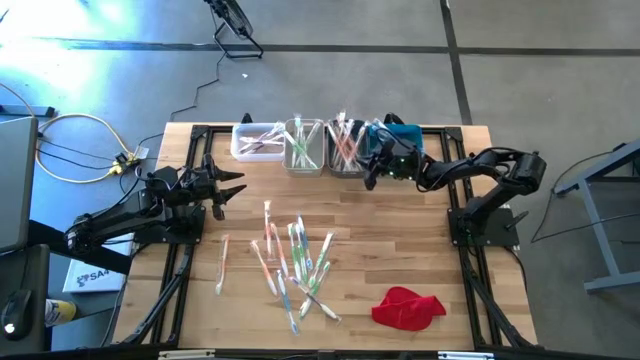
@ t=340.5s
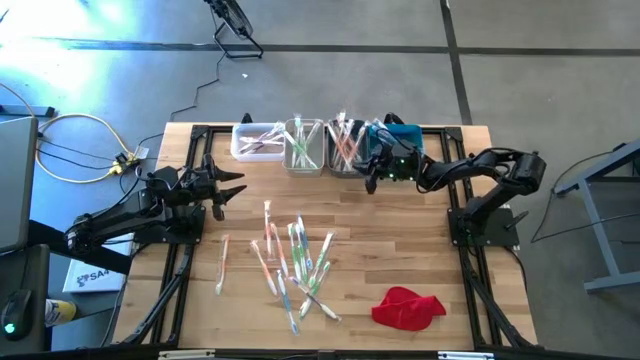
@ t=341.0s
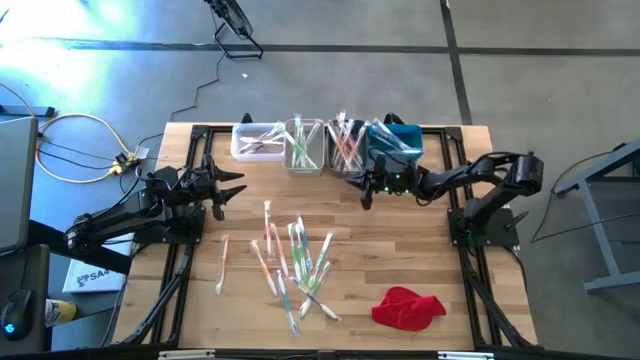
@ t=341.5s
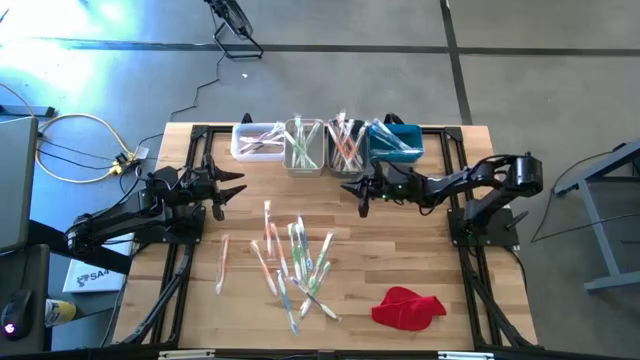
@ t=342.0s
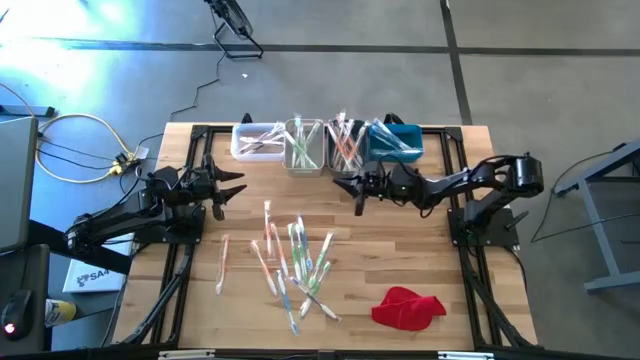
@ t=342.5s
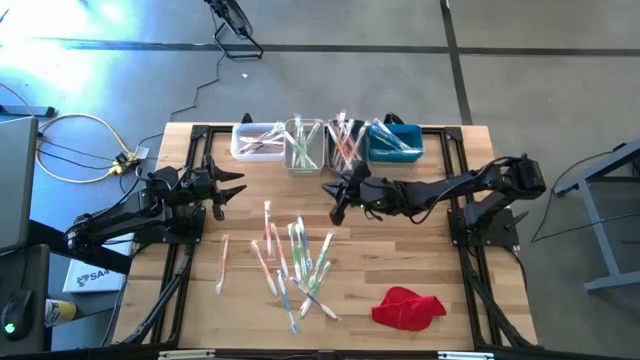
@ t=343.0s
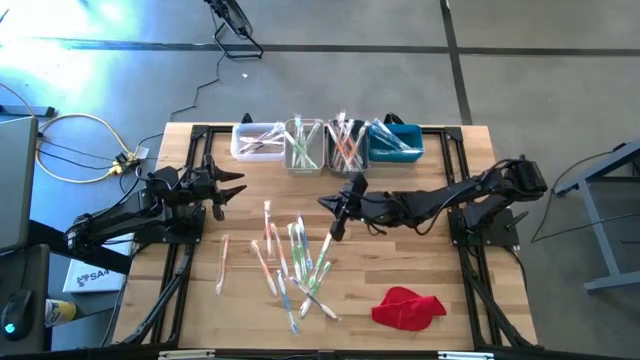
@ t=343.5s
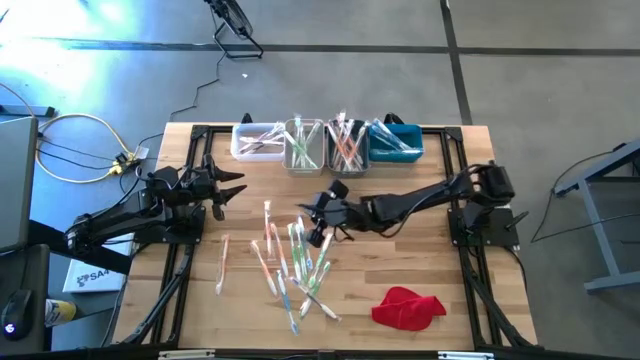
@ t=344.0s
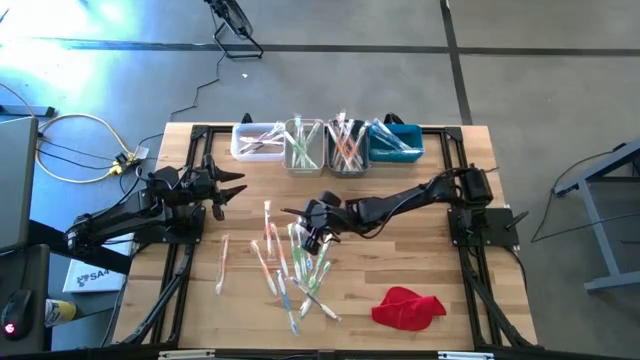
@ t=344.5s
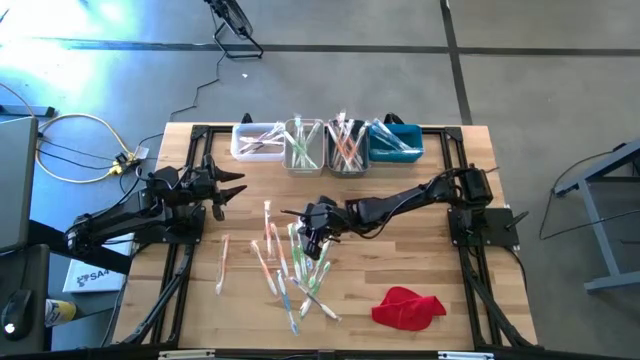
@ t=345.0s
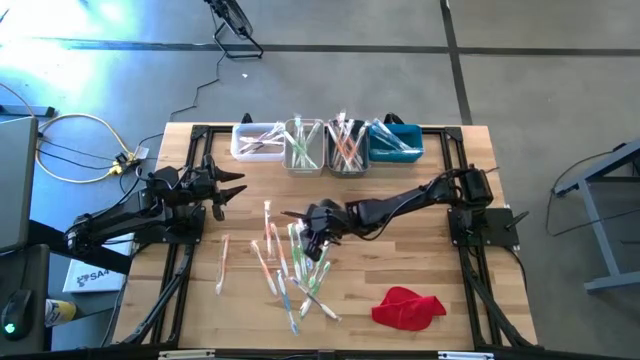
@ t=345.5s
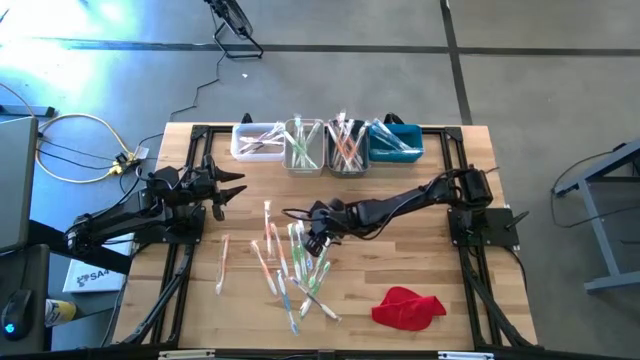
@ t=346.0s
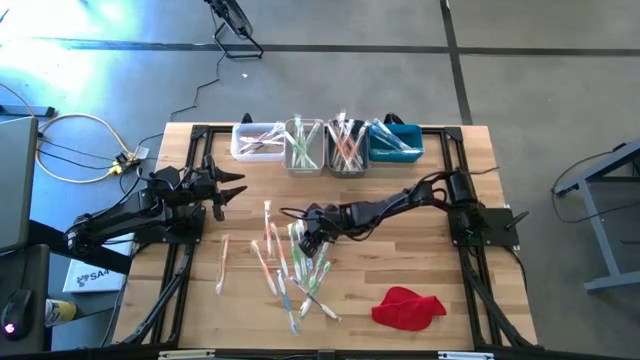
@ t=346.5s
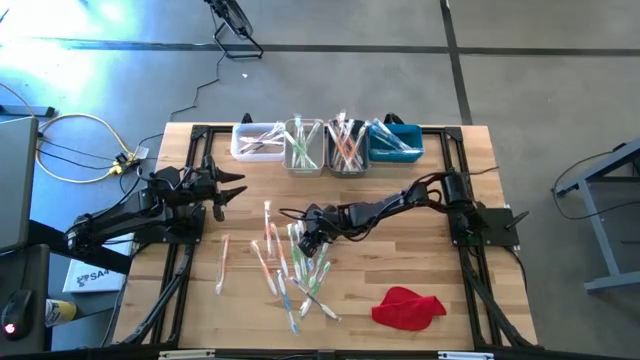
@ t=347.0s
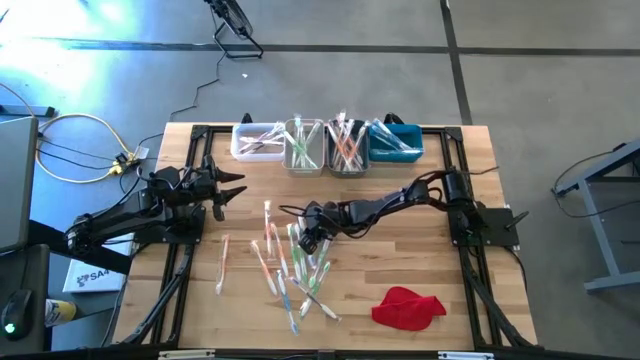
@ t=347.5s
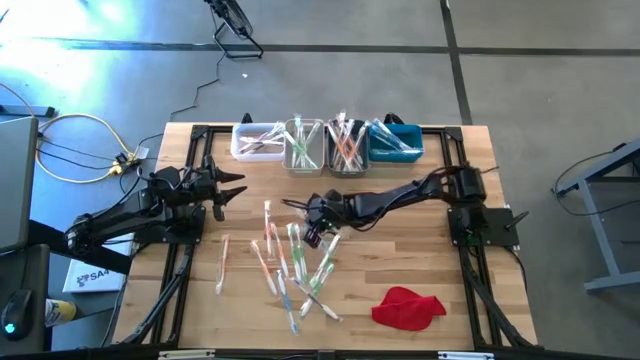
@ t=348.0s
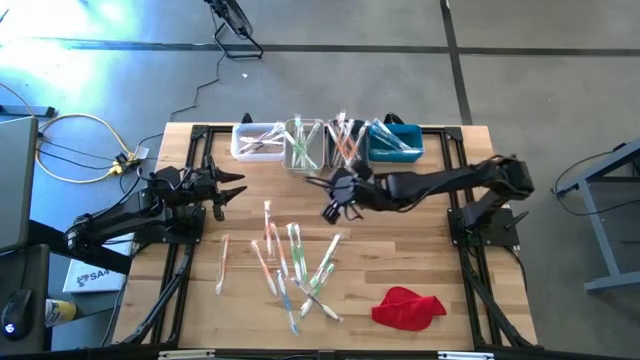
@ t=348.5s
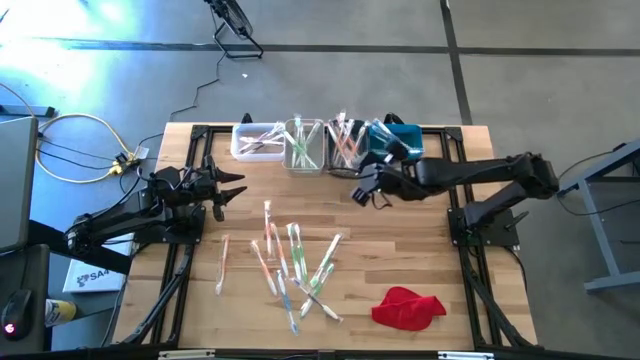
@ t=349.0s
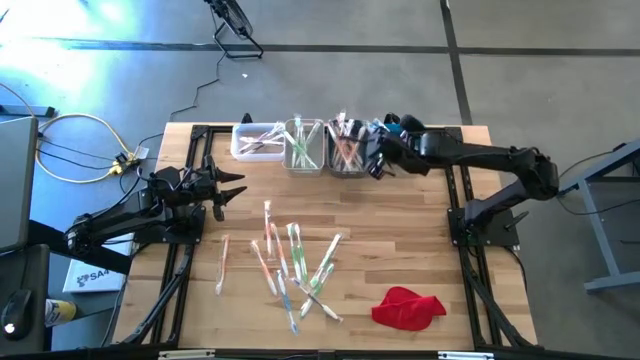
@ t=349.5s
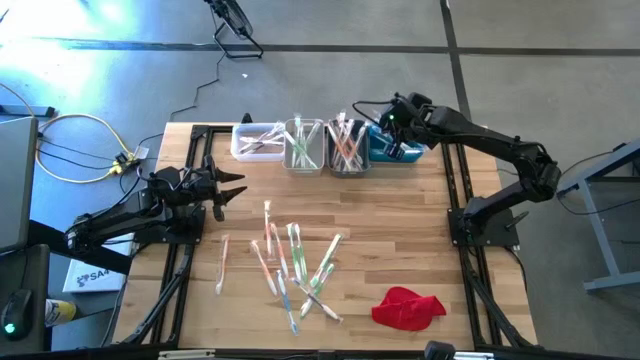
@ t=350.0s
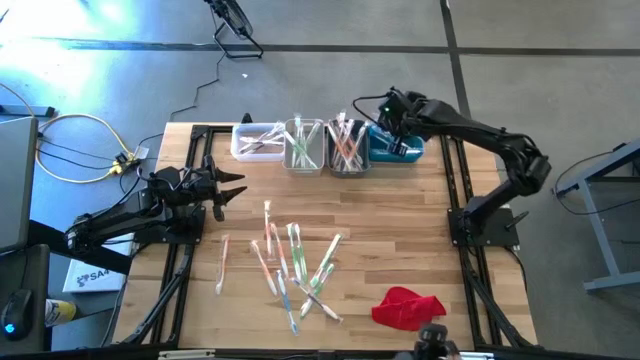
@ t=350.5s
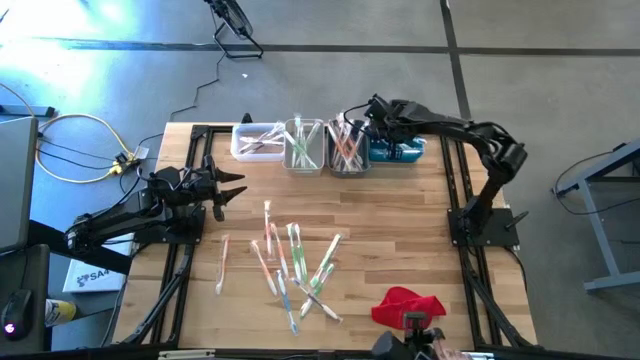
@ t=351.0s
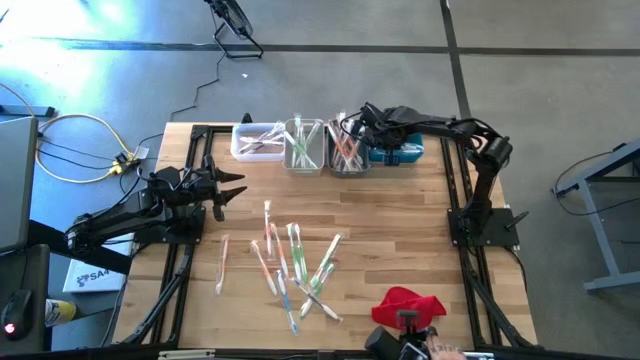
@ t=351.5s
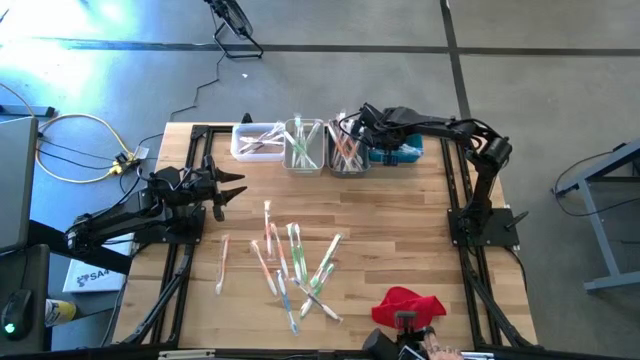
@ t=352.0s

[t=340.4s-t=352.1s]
Task: Pick & Place Toothbrushes
Put the blue toothbrush into the blue bin

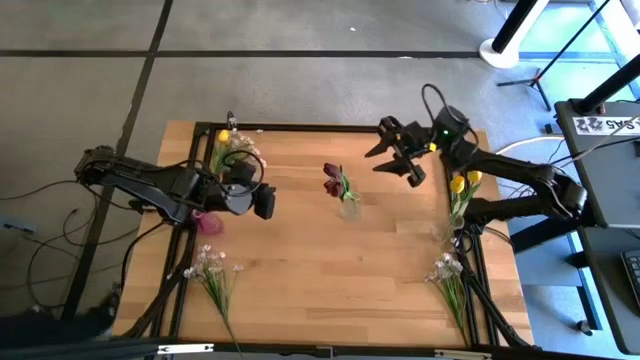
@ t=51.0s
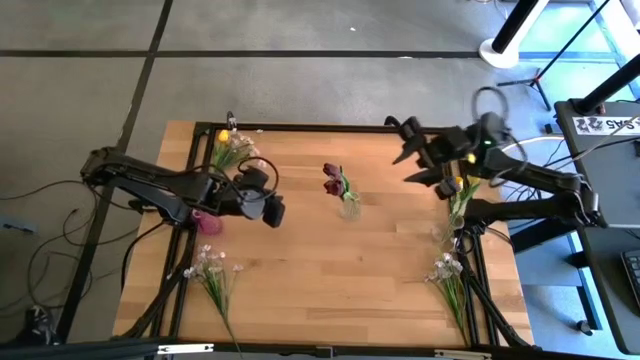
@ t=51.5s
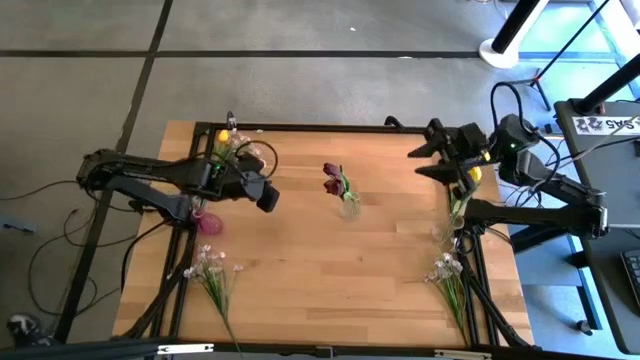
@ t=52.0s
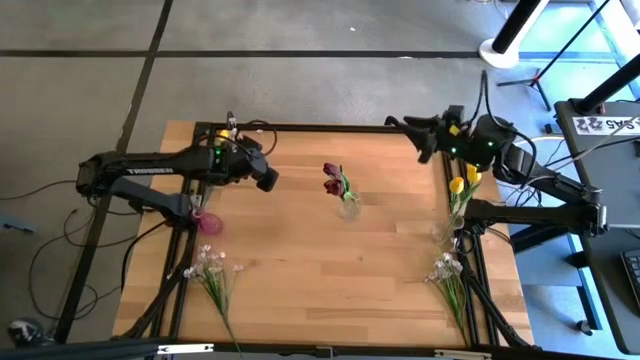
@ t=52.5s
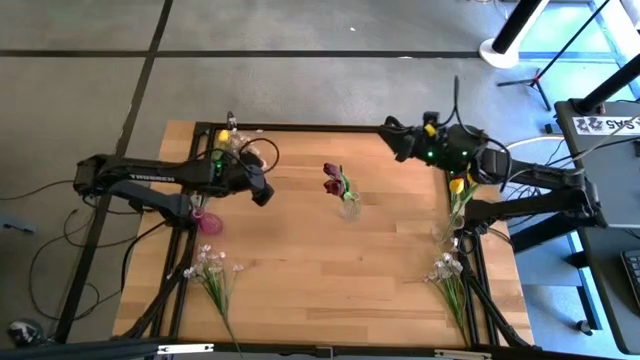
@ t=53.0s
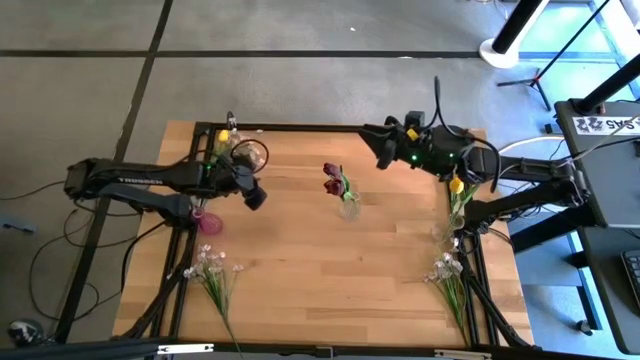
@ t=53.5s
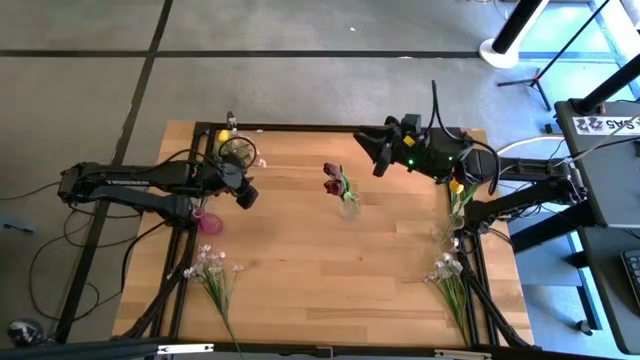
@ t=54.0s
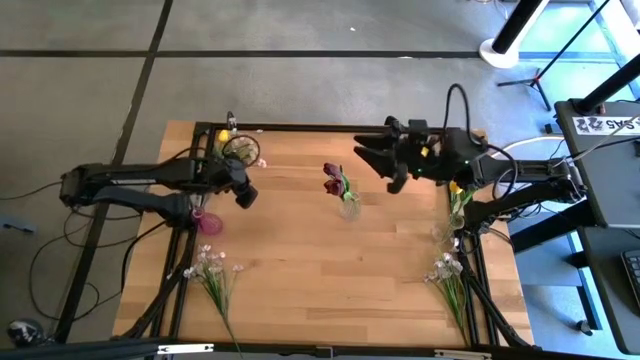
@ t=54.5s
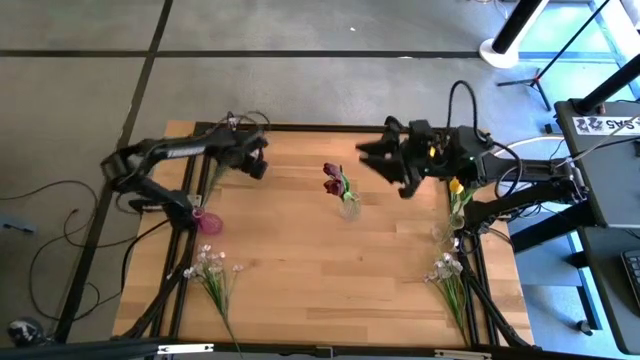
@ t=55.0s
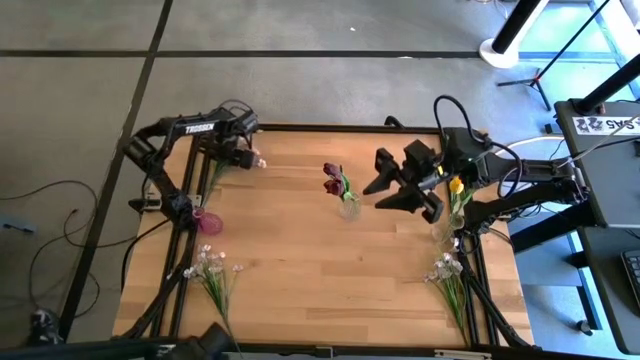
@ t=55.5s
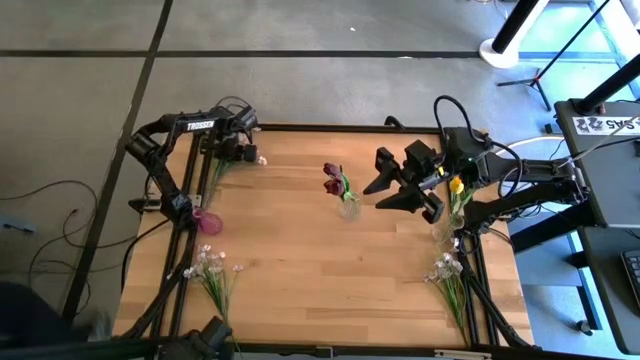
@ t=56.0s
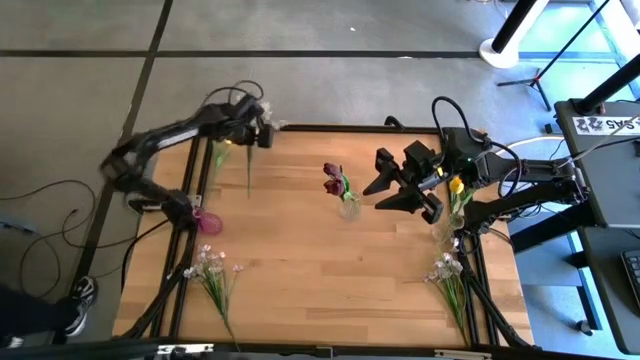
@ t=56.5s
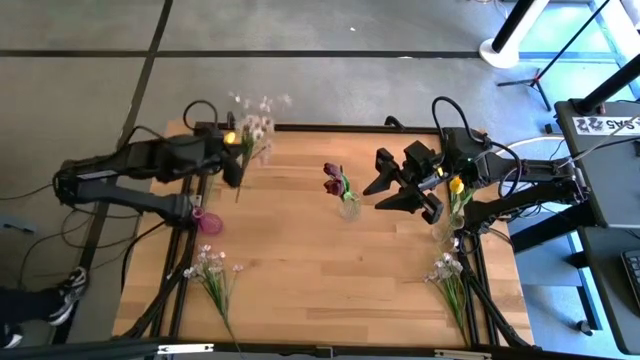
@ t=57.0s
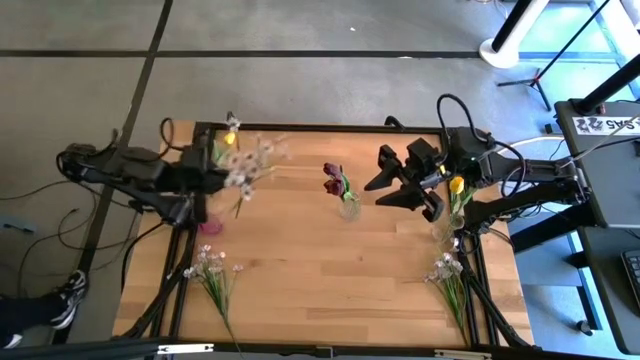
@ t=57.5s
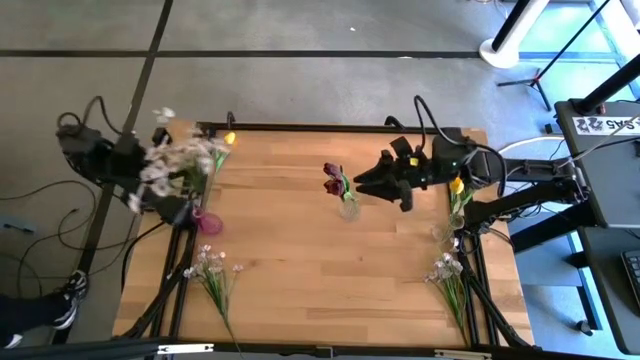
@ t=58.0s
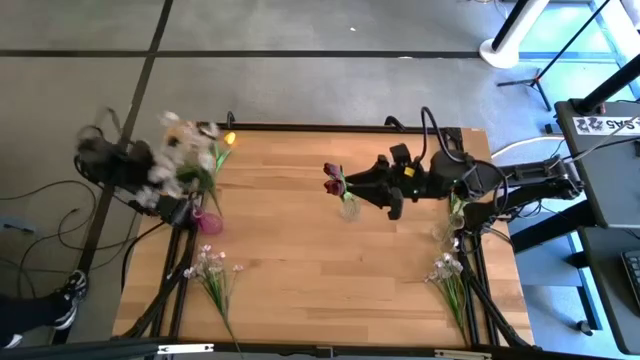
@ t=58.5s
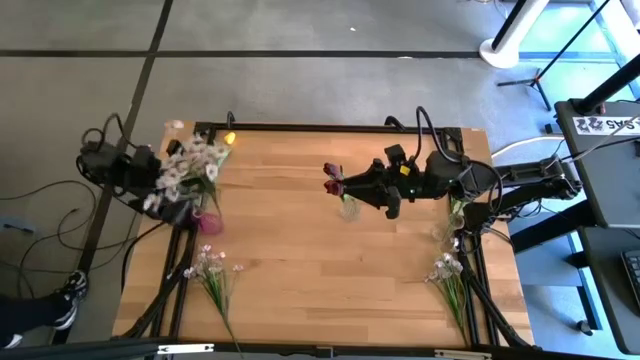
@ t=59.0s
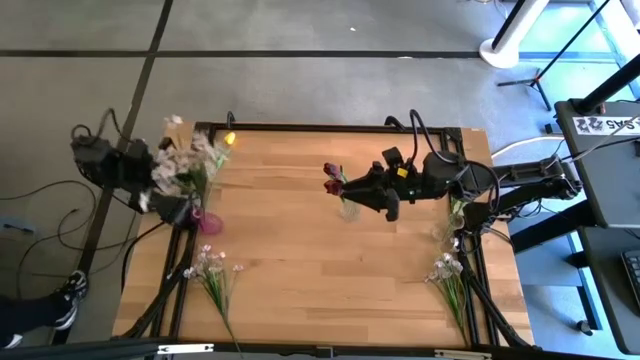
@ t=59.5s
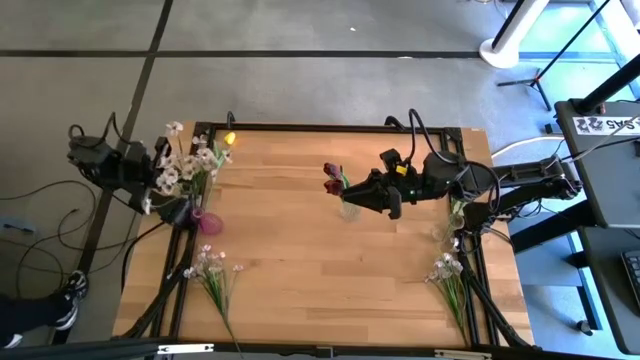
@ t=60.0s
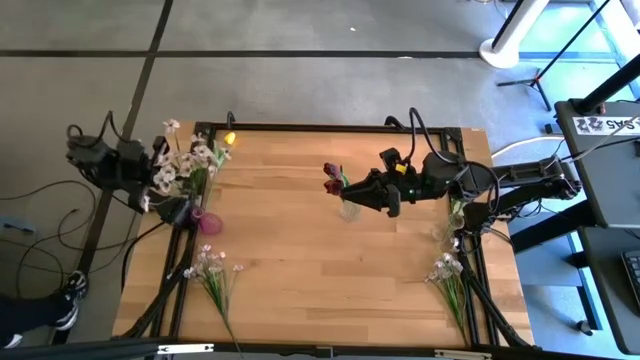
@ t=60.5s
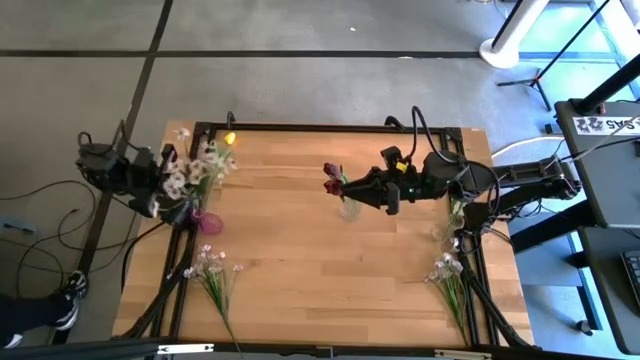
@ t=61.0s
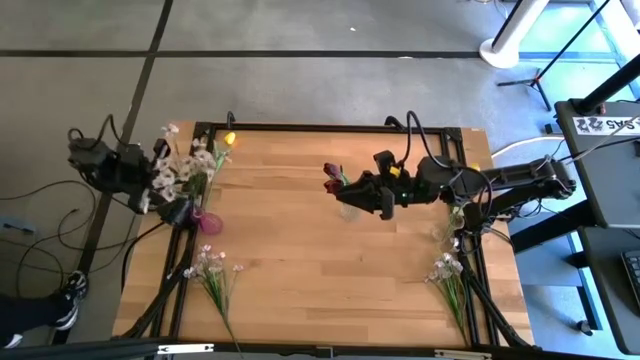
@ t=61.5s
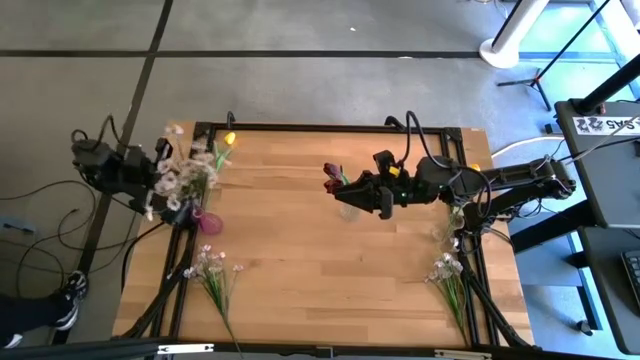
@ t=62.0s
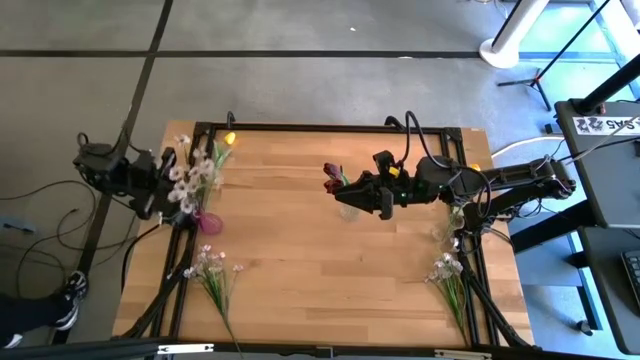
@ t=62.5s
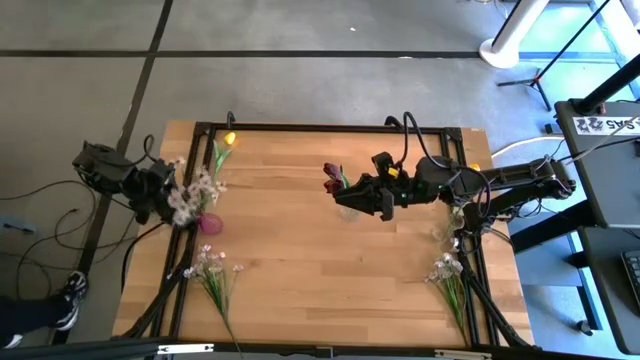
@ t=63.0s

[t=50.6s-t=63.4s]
Task: Sort flowers into vase by color
Put the top white flowers into the violet vase
